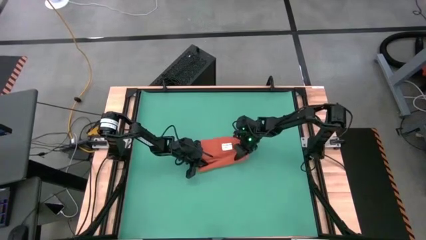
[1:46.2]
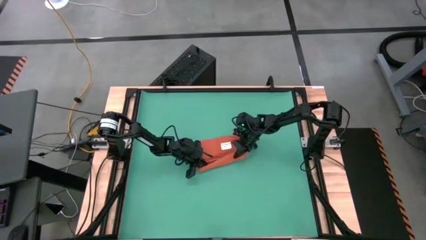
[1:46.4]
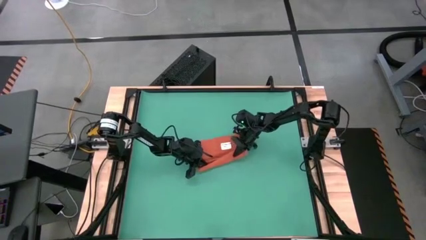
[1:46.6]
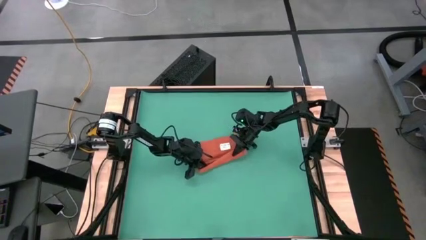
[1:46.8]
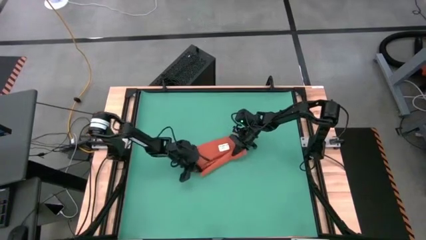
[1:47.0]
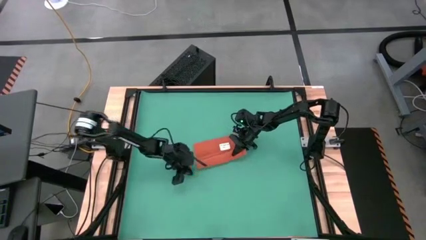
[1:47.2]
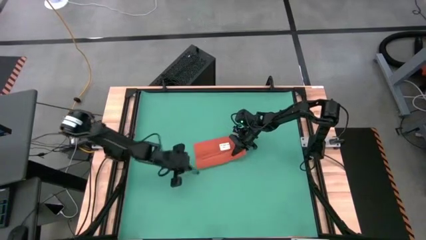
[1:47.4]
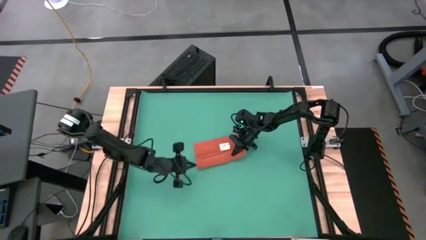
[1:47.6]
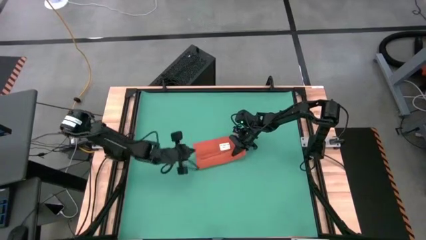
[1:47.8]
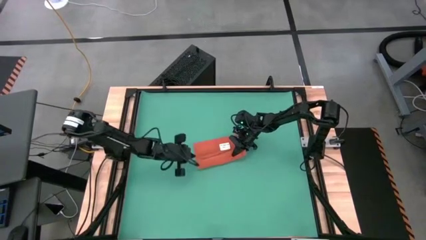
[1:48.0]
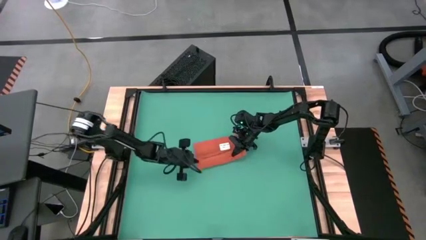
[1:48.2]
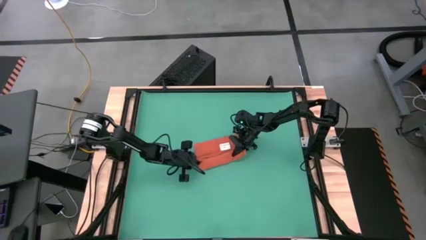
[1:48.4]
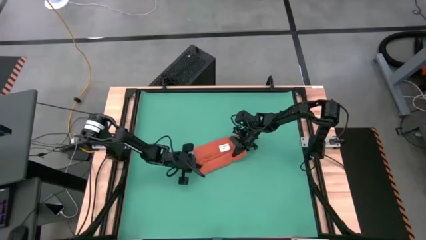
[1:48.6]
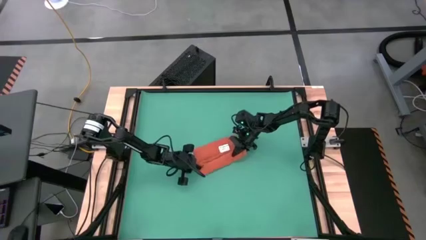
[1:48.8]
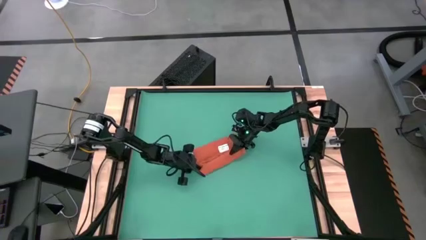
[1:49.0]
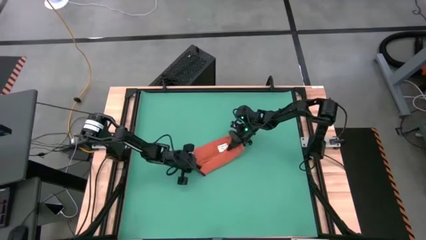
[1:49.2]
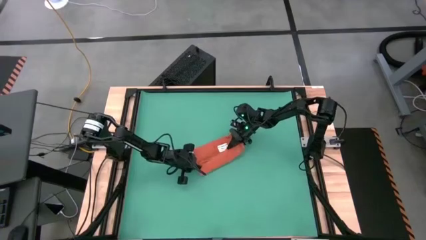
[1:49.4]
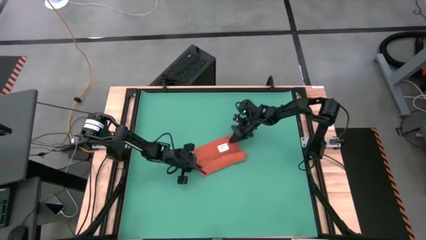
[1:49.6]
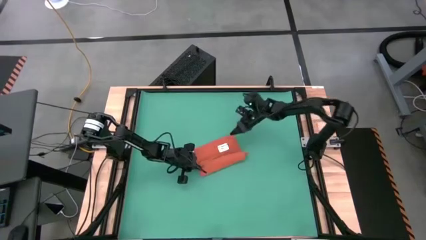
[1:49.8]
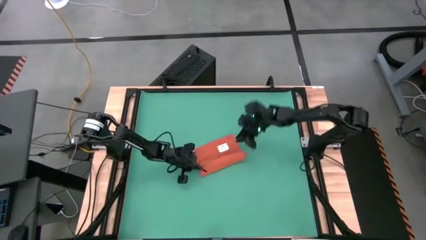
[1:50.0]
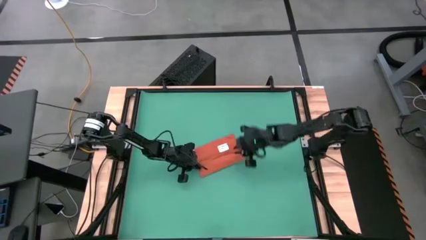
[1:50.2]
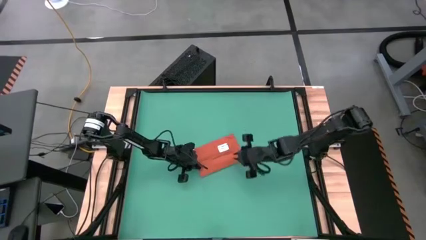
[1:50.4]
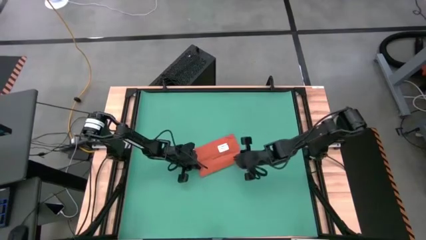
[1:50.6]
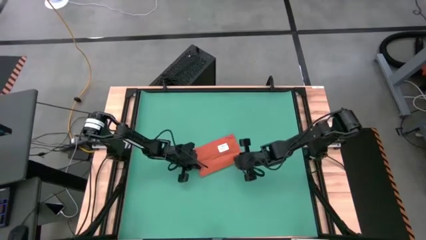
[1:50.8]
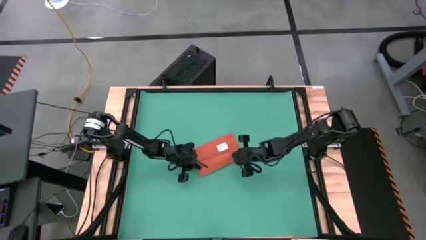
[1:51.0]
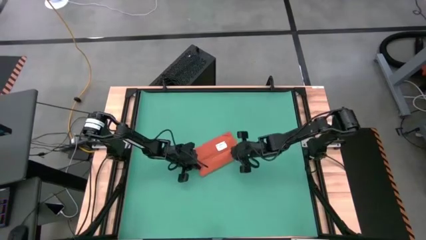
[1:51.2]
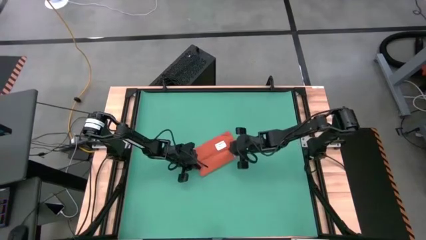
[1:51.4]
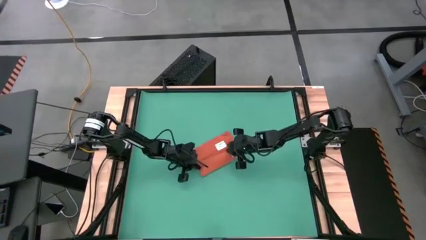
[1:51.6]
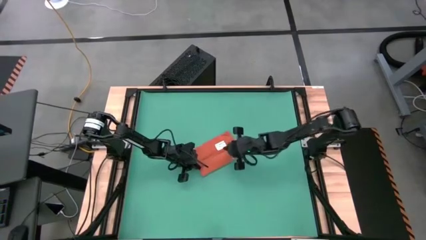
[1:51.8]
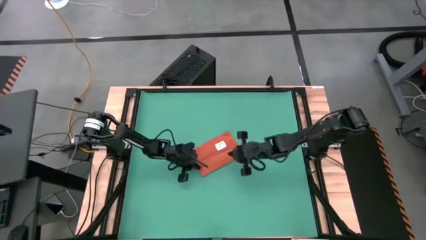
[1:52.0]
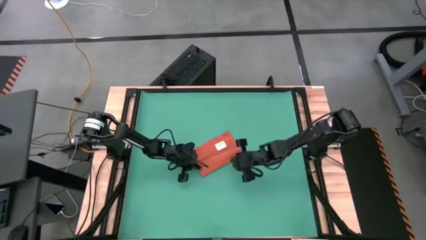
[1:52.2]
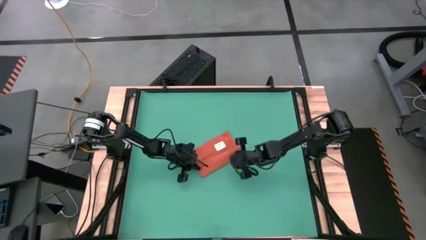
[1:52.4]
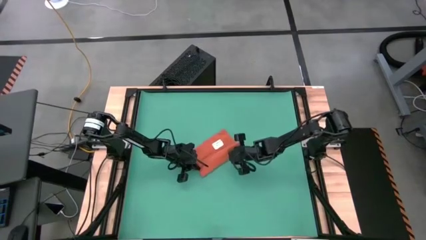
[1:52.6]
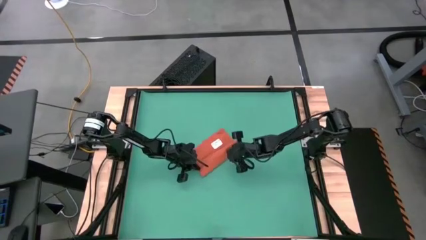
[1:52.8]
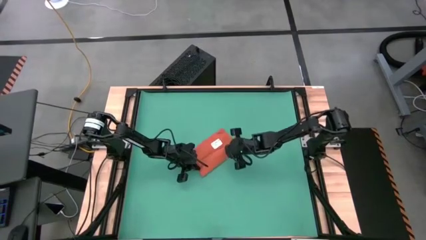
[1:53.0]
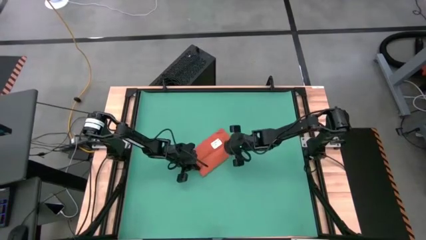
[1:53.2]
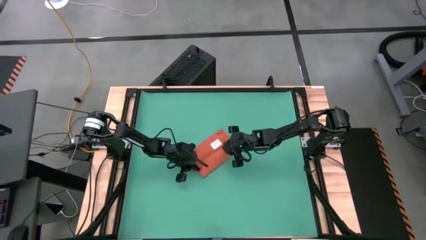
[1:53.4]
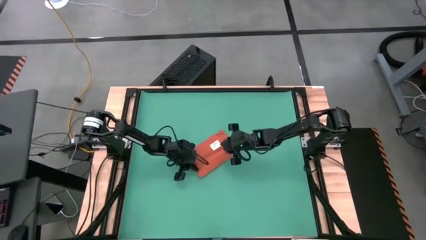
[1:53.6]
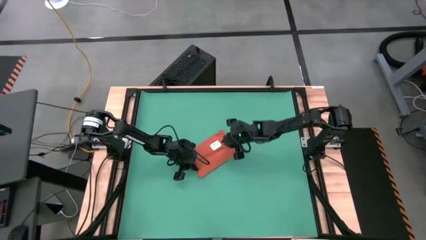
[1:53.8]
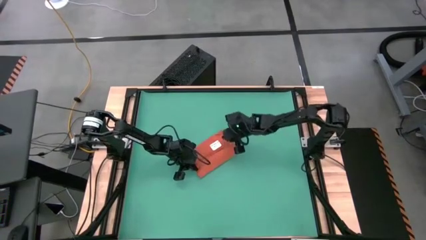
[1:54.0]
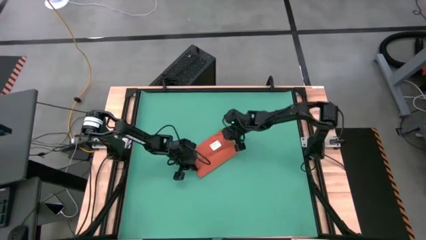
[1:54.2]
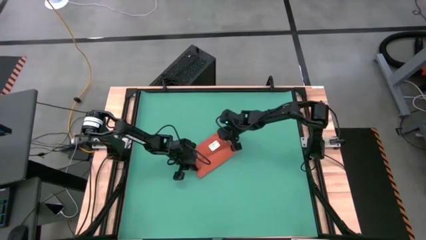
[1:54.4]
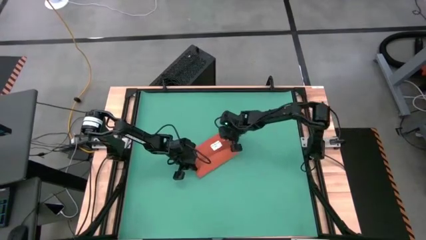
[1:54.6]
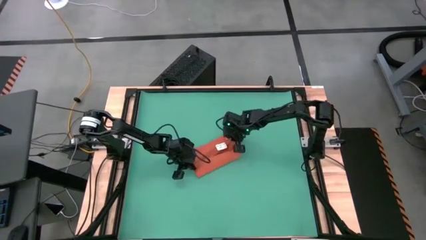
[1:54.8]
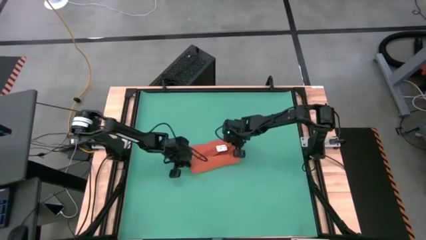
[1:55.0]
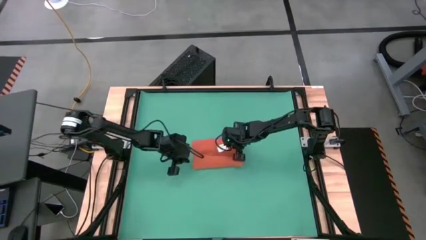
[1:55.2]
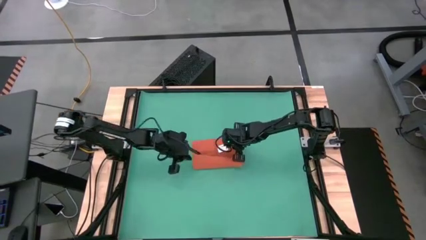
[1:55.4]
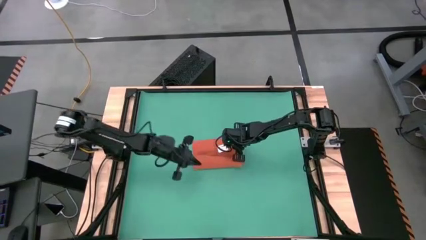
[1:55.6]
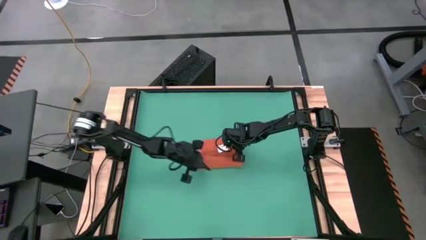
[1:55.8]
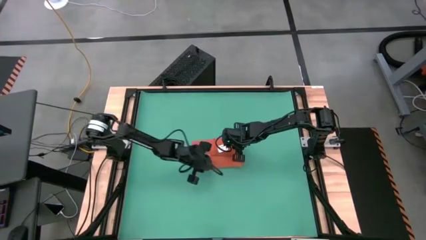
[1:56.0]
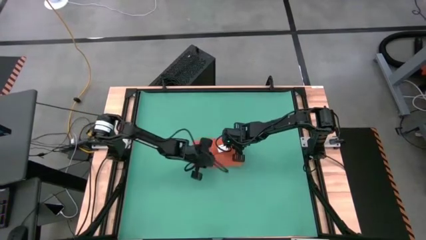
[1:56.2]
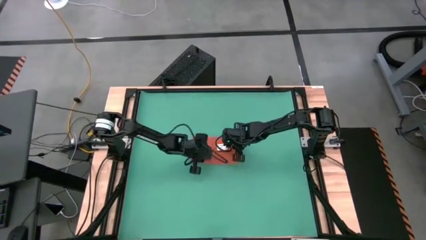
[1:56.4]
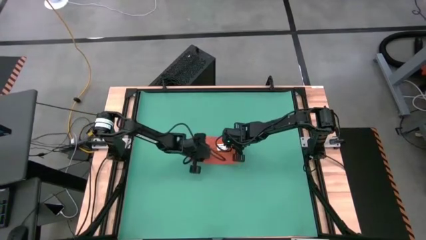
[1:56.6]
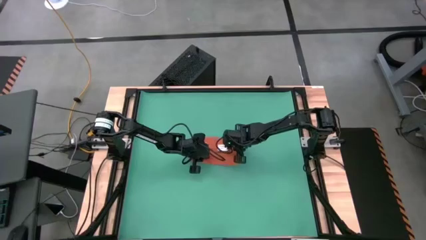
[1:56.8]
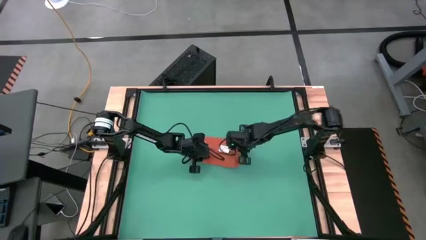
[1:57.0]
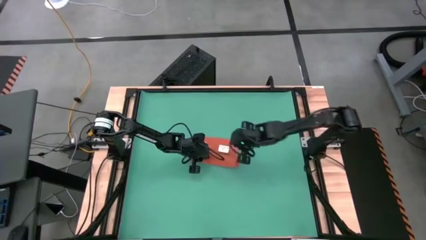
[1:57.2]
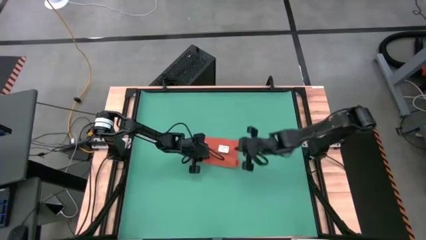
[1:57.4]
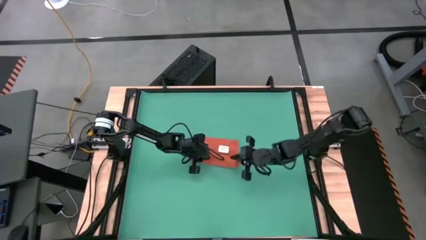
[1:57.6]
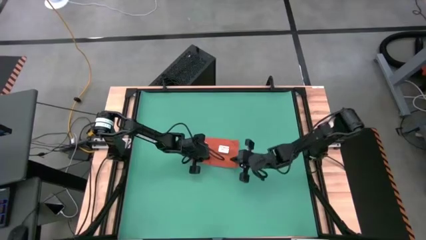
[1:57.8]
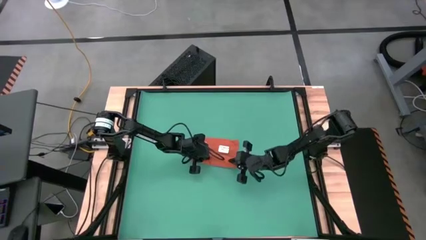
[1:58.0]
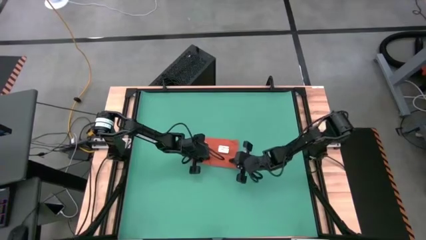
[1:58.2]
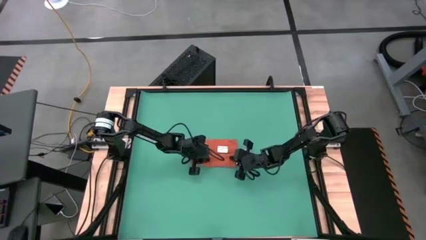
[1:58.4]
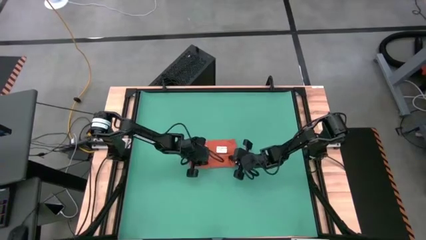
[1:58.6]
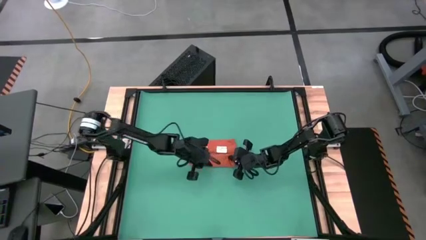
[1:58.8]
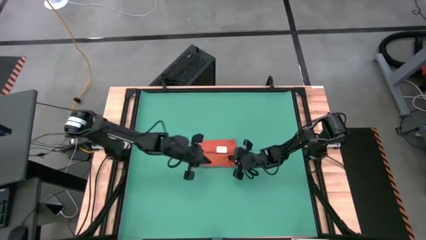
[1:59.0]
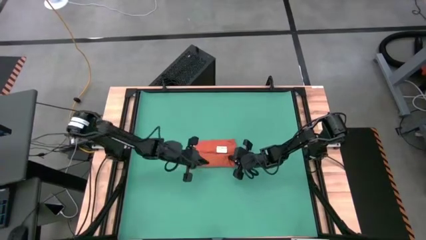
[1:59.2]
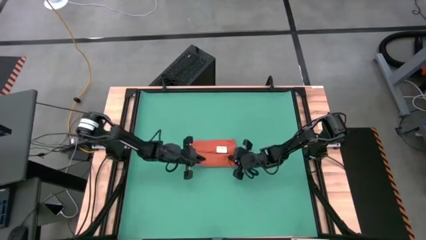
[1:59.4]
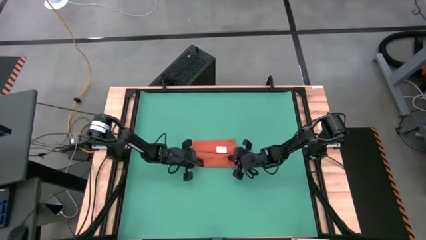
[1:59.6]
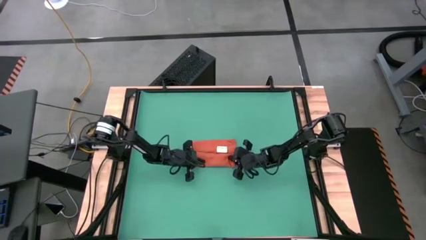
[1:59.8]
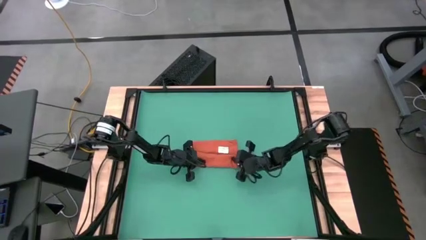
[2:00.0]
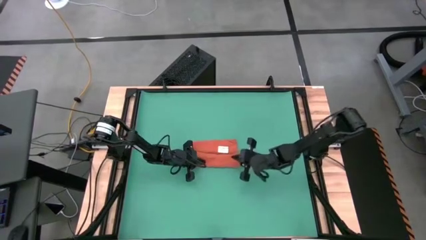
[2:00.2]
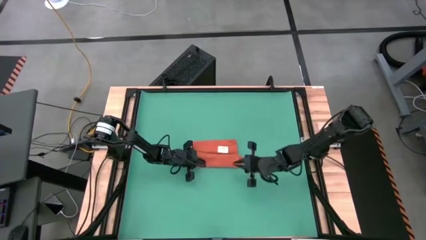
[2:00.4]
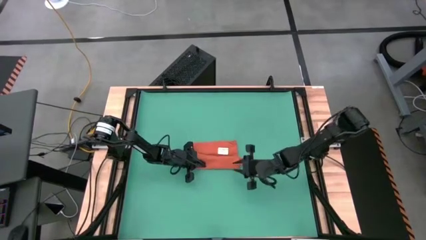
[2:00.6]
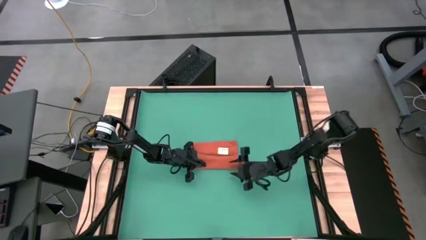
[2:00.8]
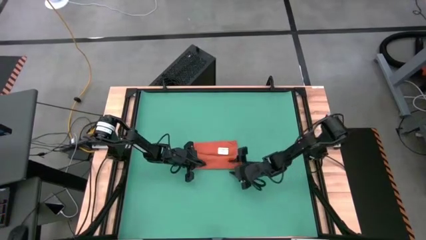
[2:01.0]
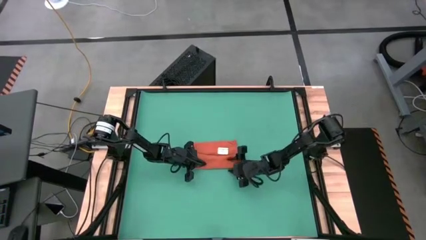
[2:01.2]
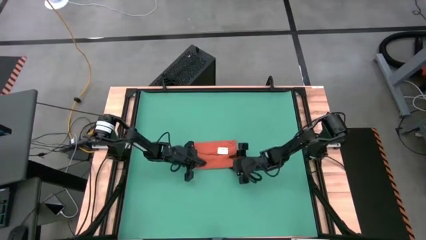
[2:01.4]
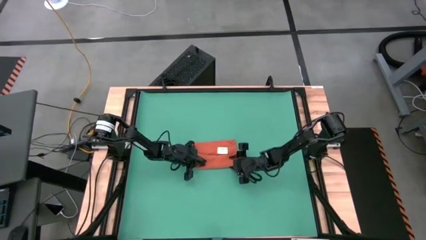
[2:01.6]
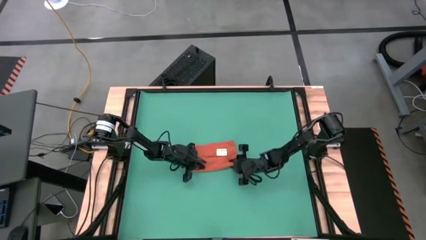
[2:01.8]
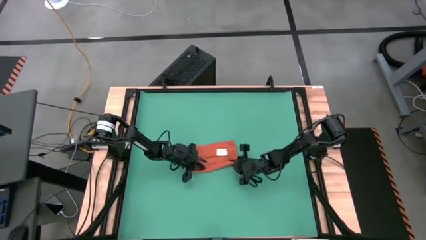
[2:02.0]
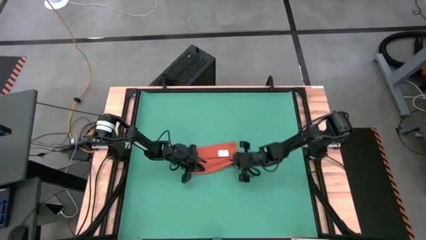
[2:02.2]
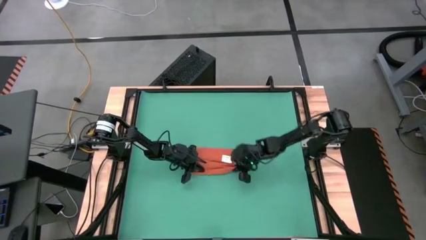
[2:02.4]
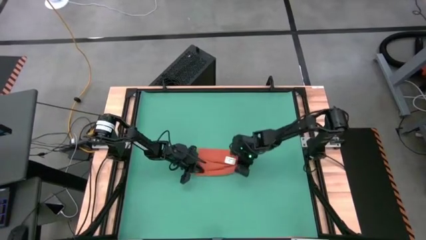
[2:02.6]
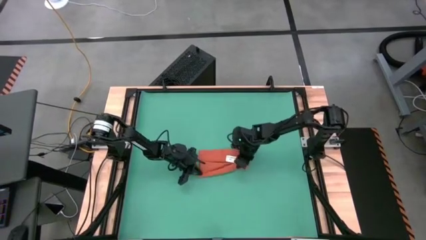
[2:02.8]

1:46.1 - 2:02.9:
Task: Roll towel
Roll the orange towel
